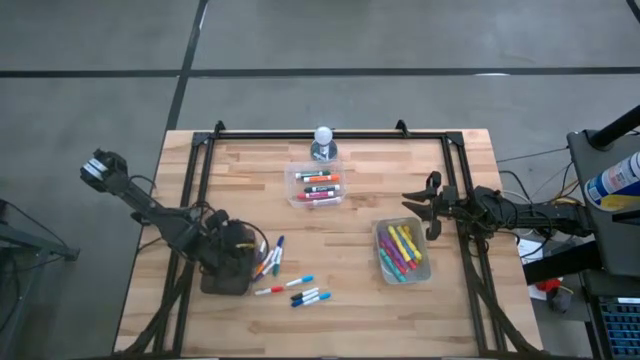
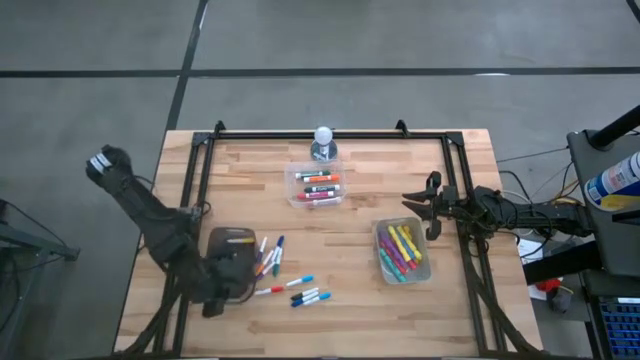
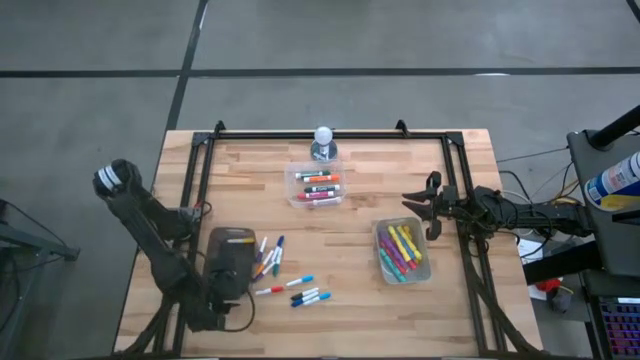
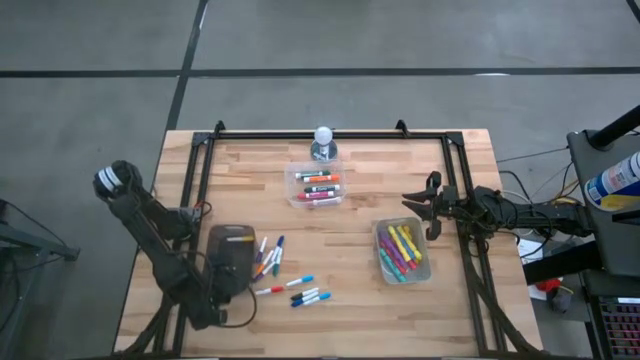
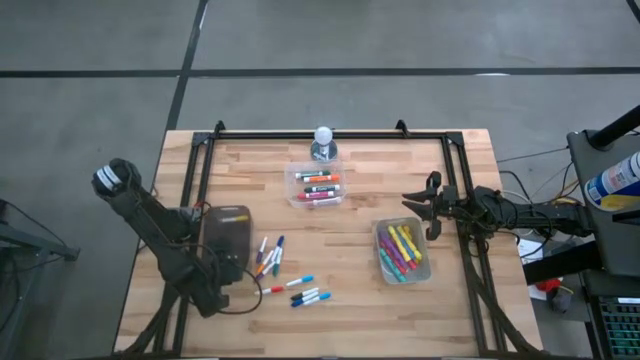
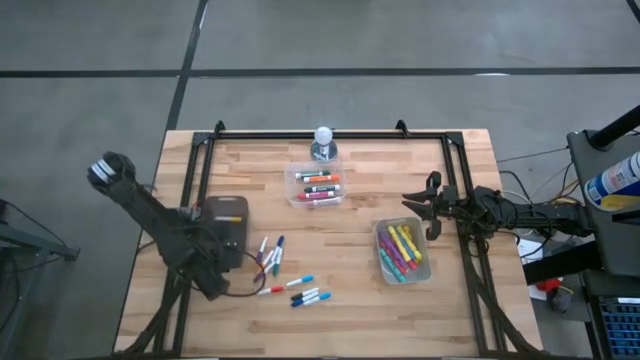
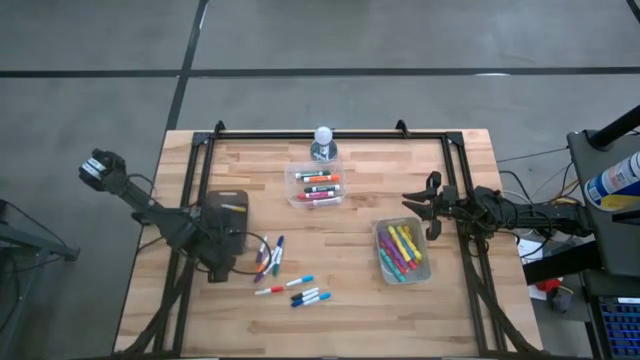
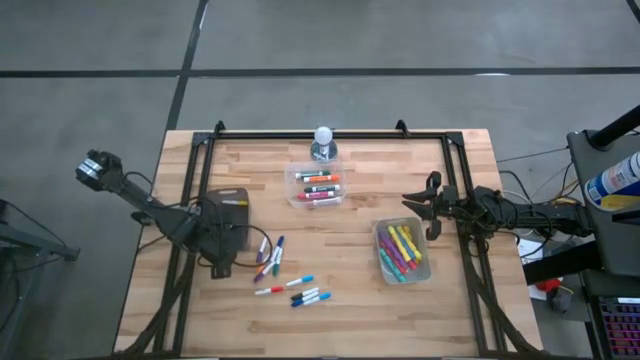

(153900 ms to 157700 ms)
Task: Pick & Place Markers
Adjust the transparent black bin

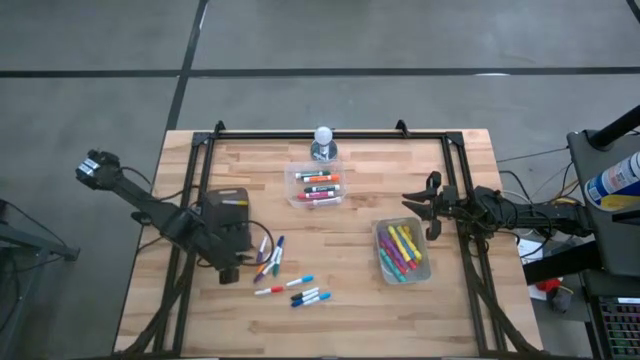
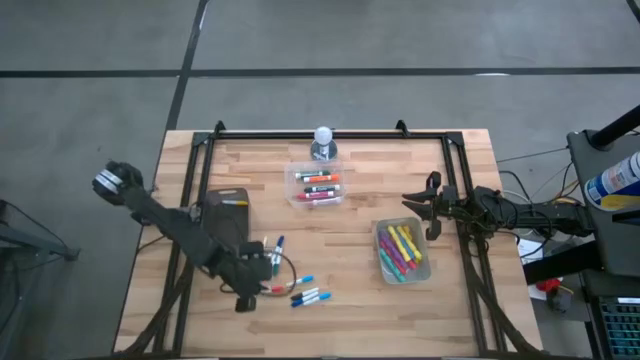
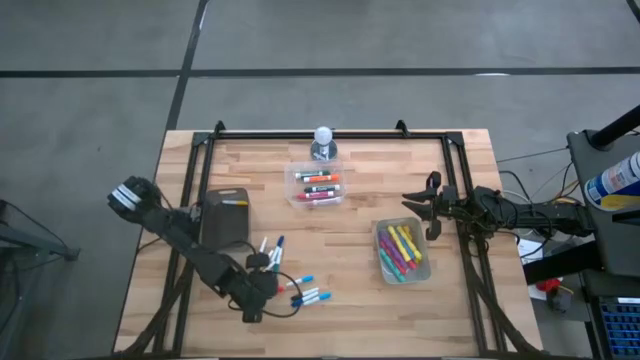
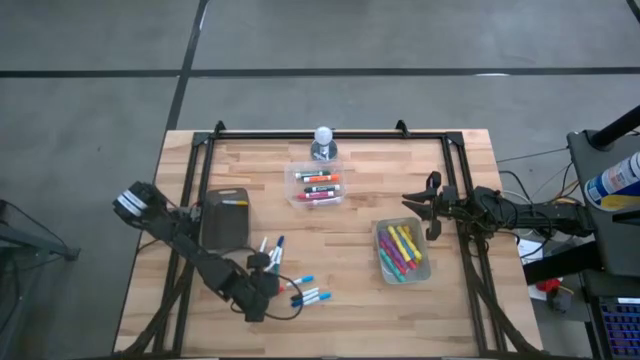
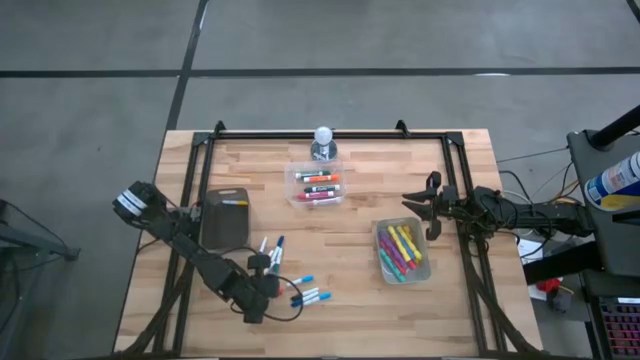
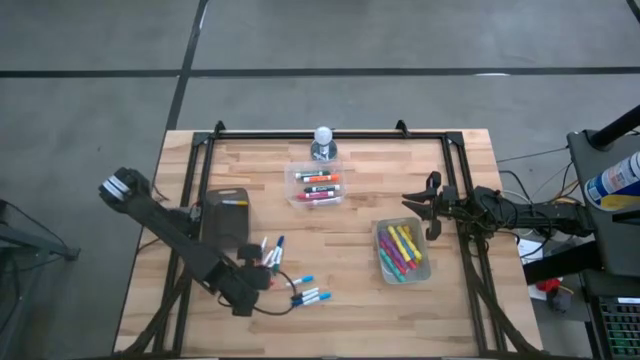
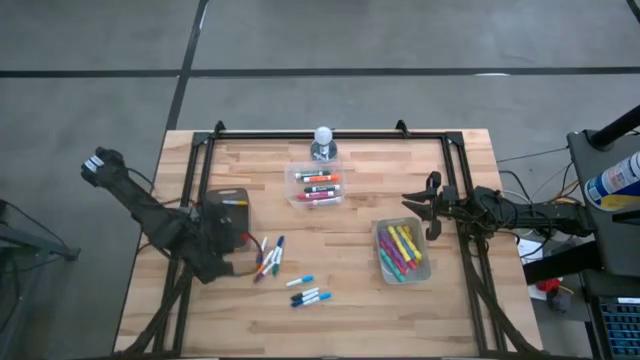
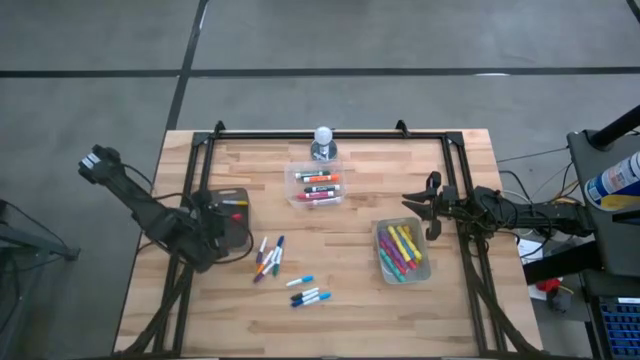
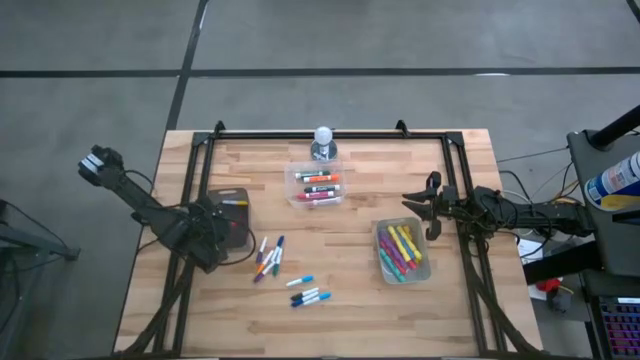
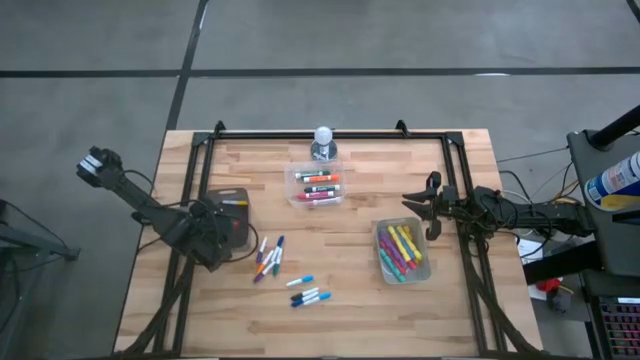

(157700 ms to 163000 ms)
Put the red mini marker into the transparent black bin

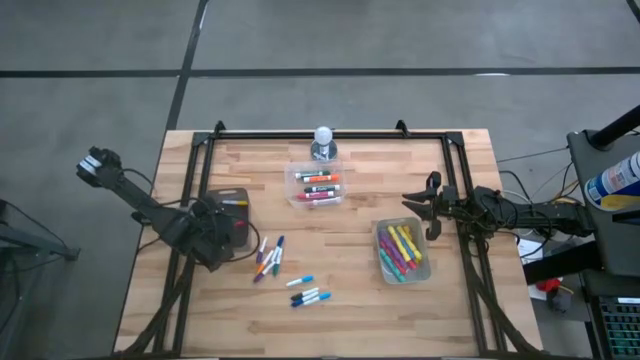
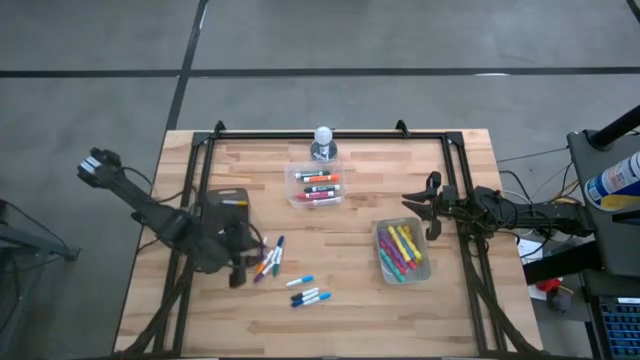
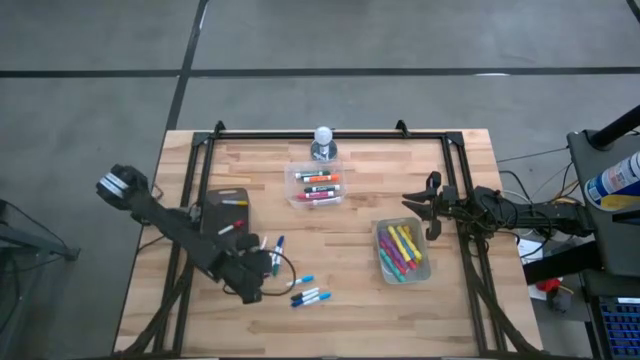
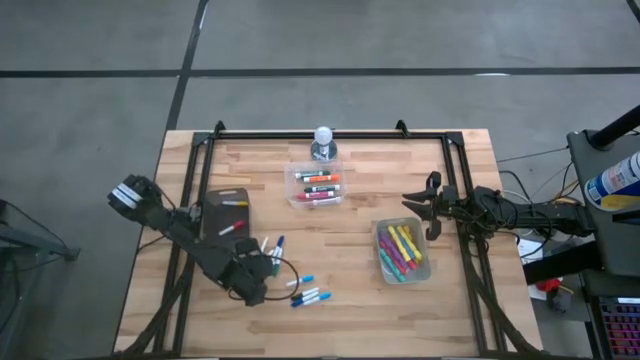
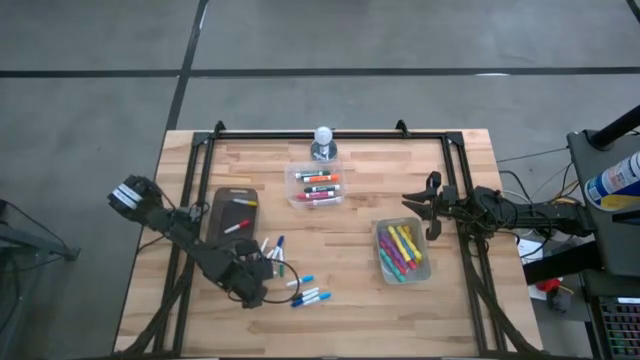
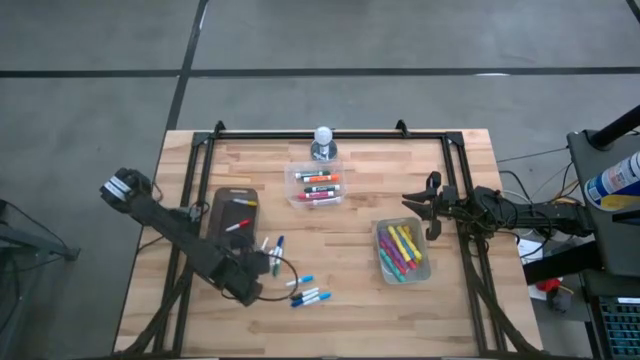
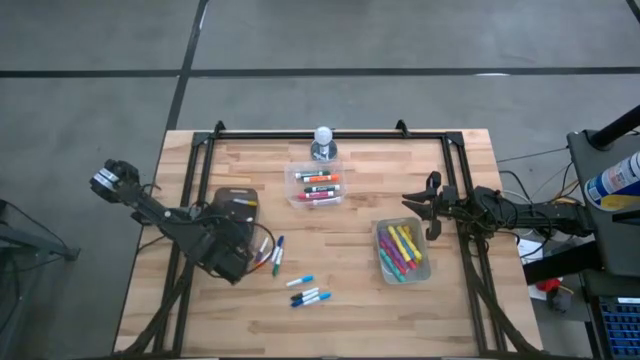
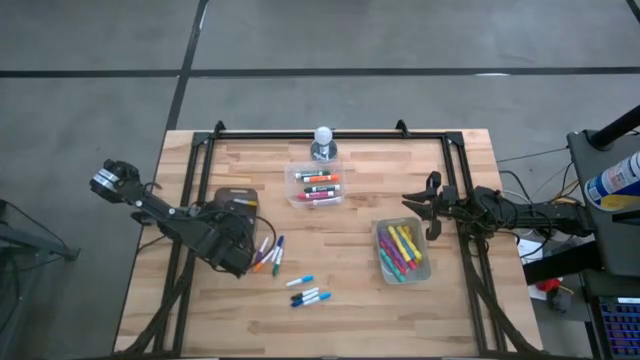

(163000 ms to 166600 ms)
Put the bottom purple mini marker into the transparent black bin

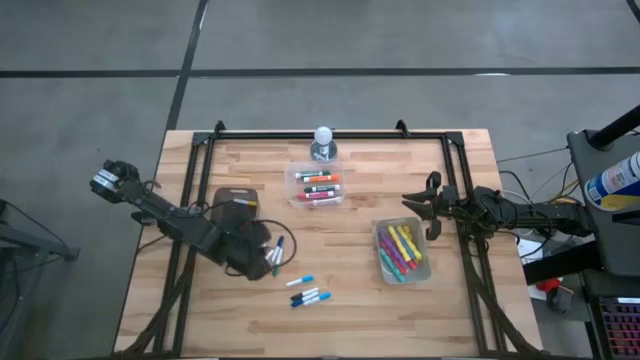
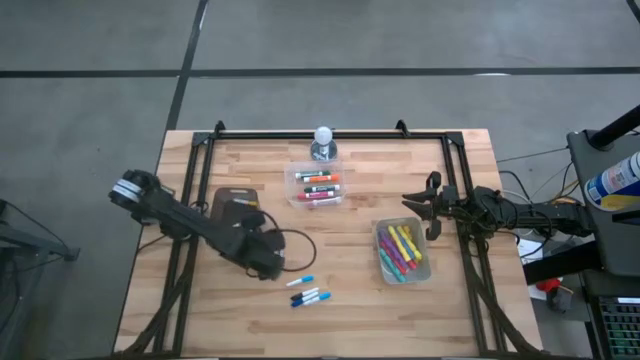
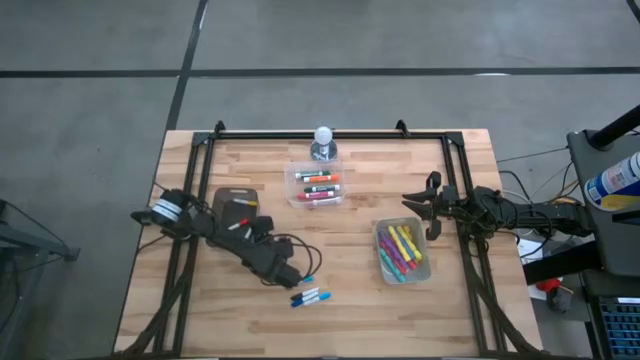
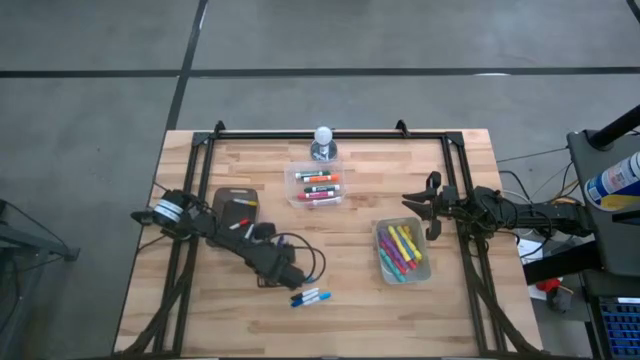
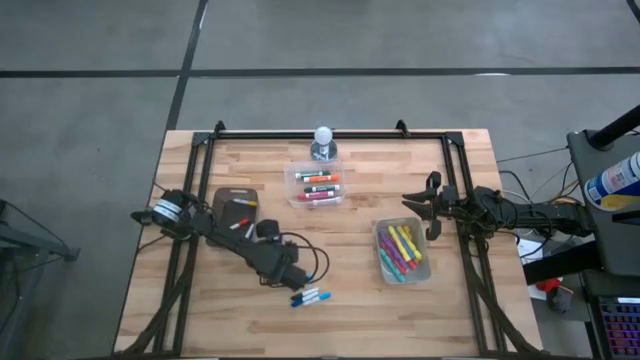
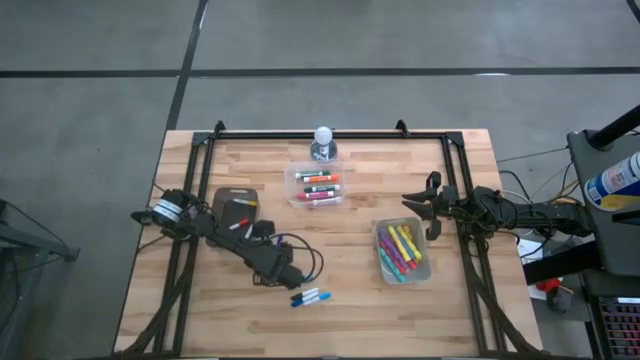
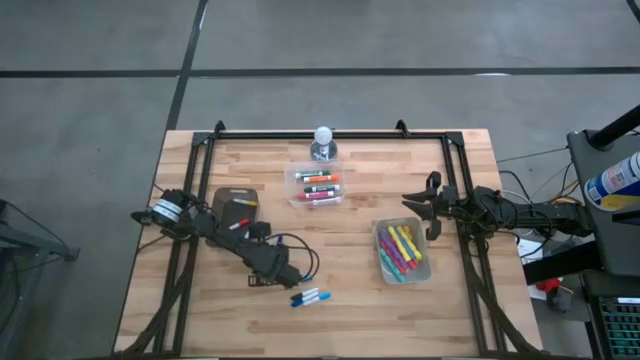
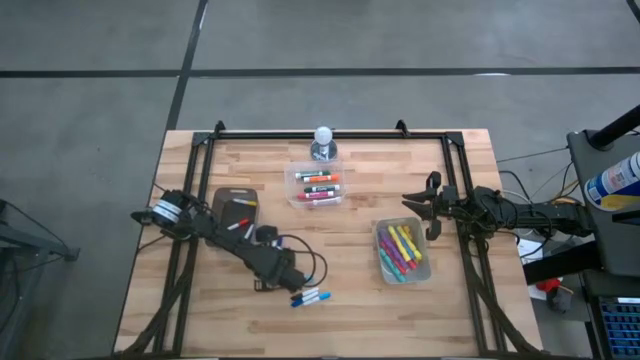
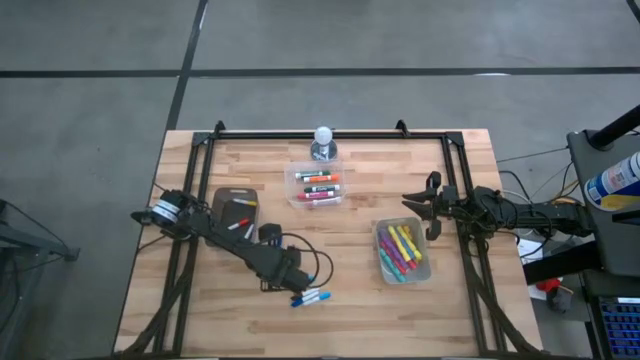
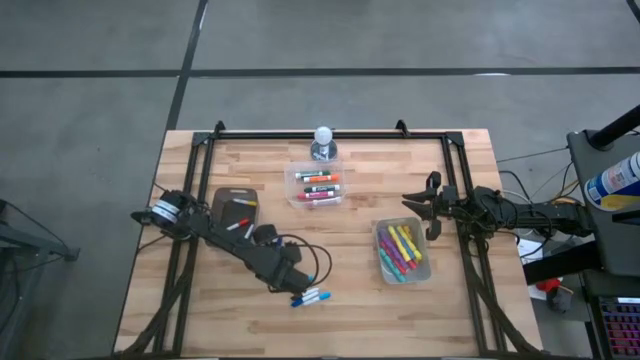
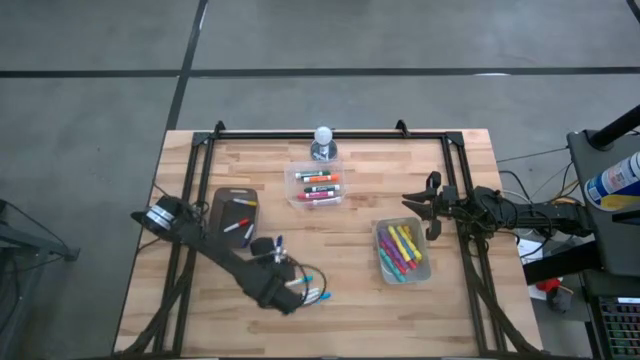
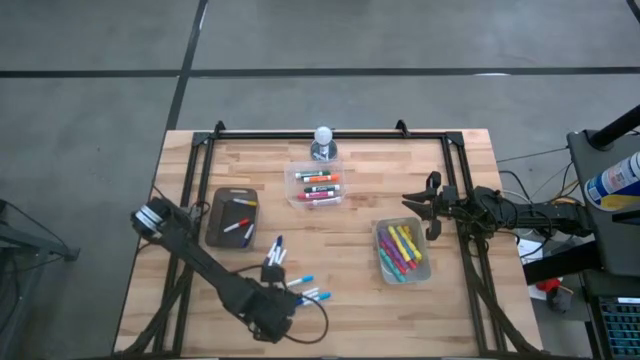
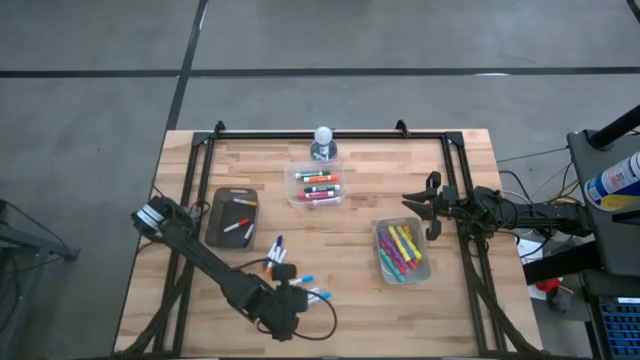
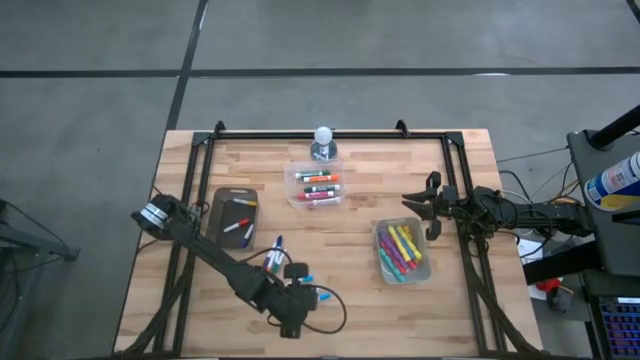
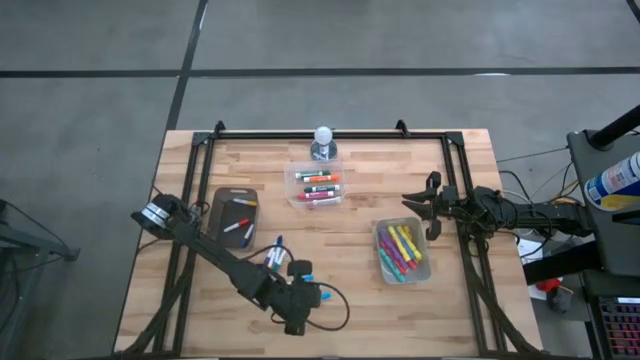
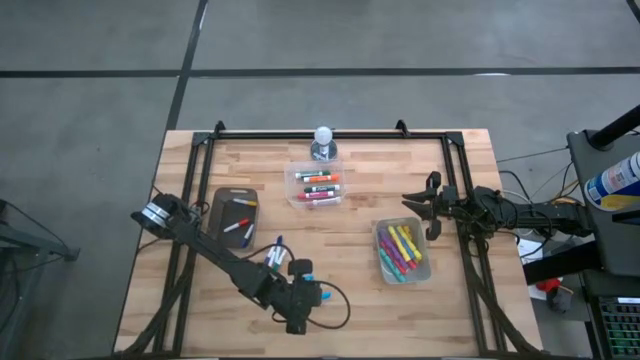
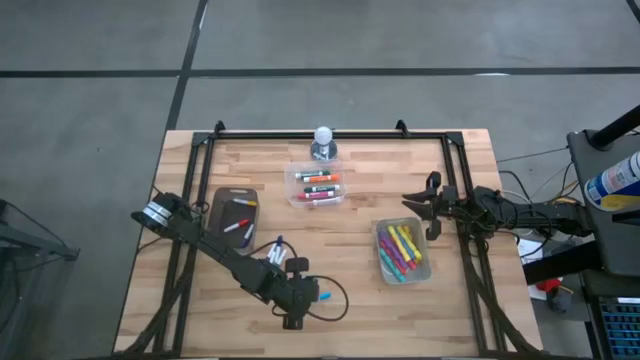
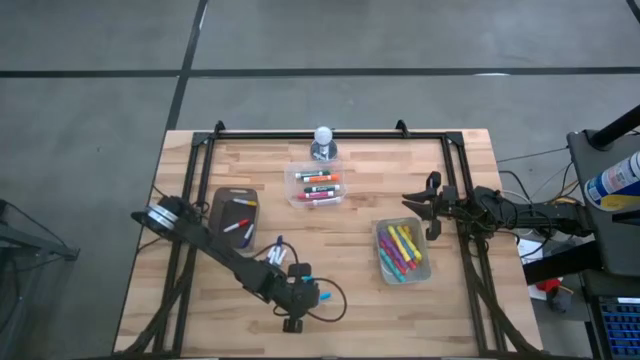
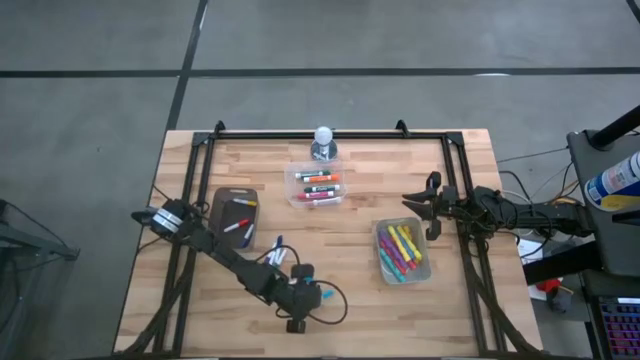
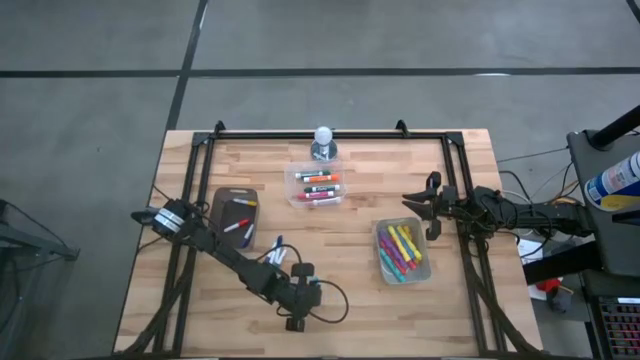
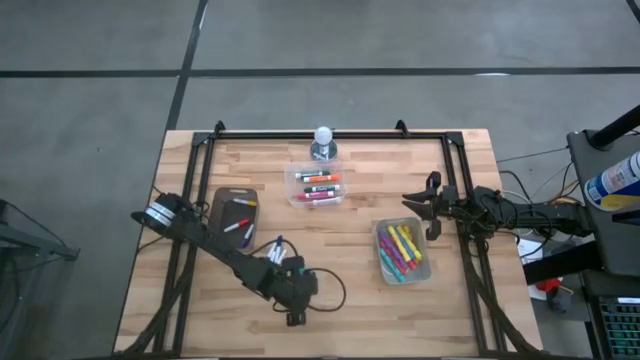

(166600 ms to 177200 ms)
Put the right light blue mini marker into the transparent black bin
